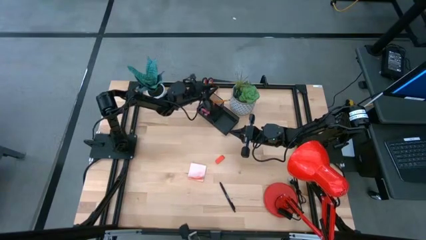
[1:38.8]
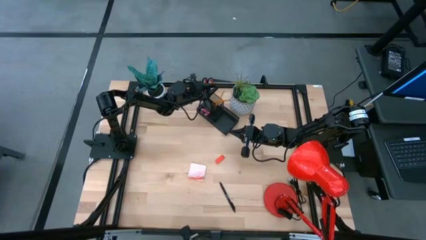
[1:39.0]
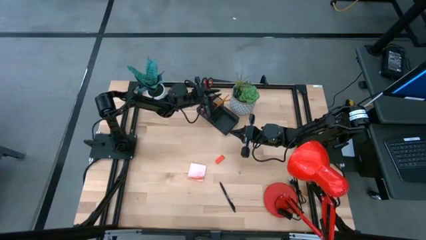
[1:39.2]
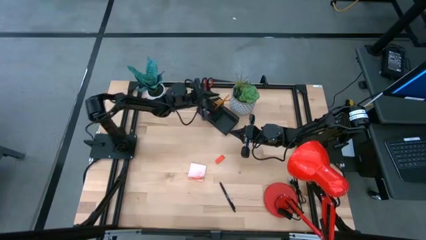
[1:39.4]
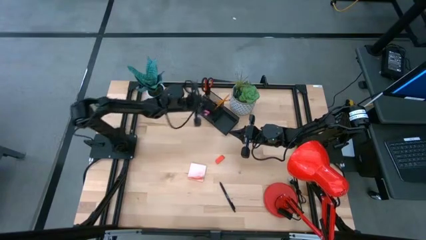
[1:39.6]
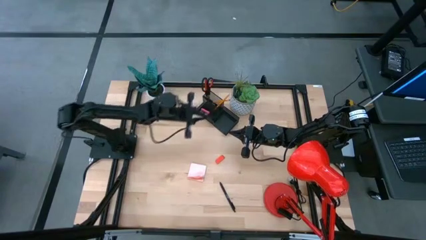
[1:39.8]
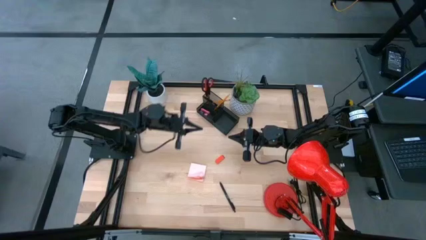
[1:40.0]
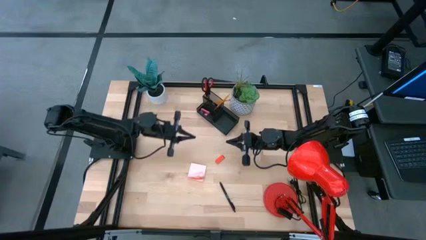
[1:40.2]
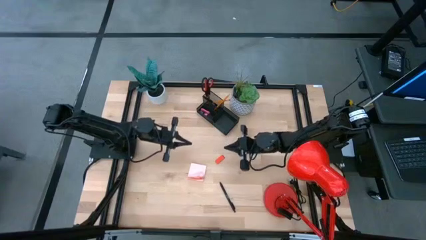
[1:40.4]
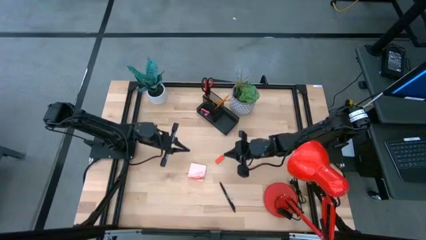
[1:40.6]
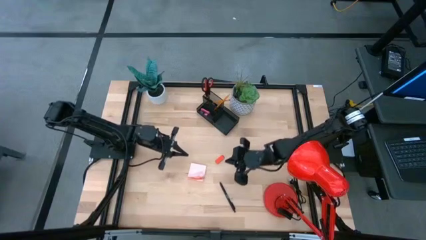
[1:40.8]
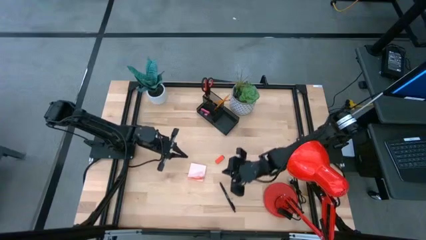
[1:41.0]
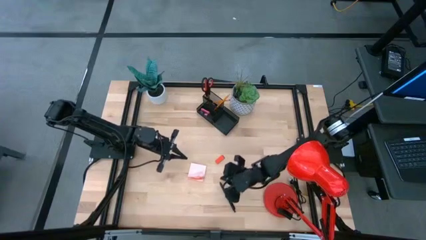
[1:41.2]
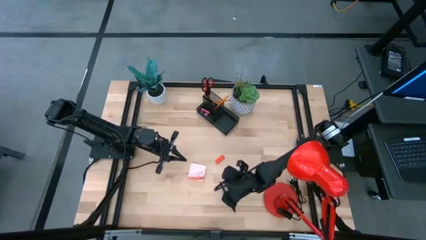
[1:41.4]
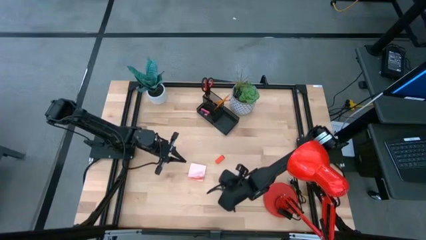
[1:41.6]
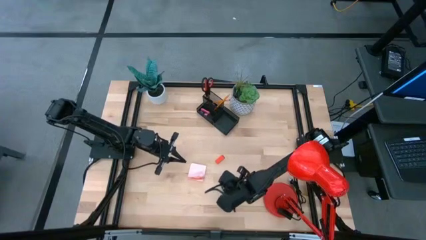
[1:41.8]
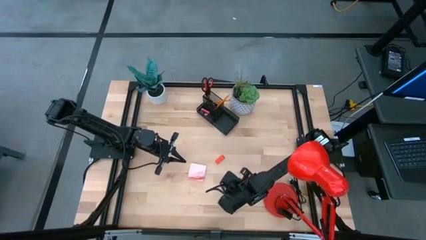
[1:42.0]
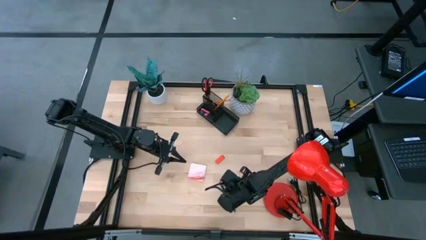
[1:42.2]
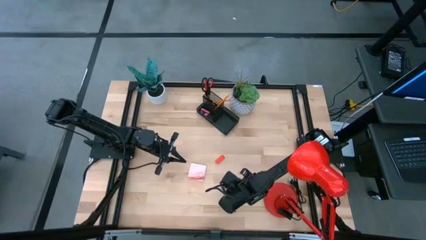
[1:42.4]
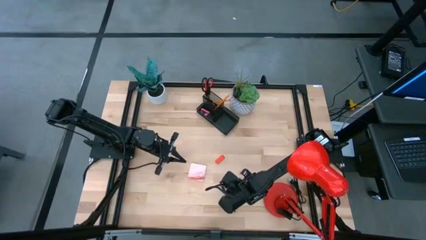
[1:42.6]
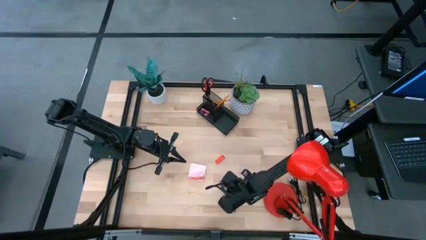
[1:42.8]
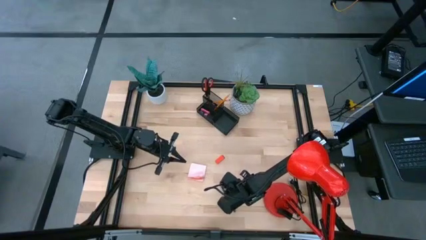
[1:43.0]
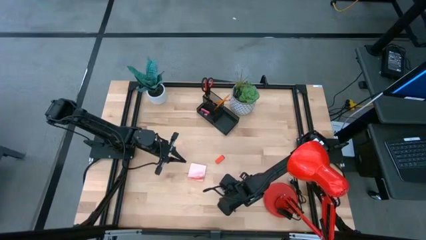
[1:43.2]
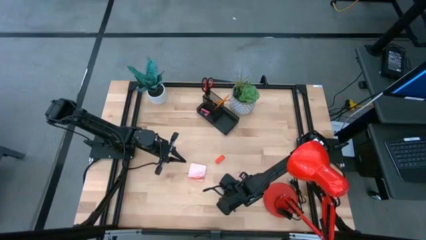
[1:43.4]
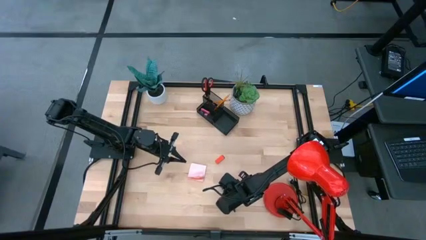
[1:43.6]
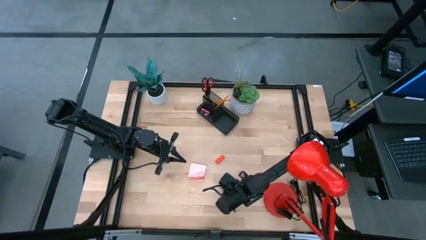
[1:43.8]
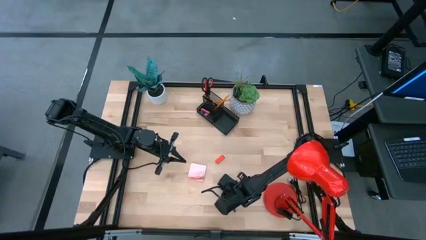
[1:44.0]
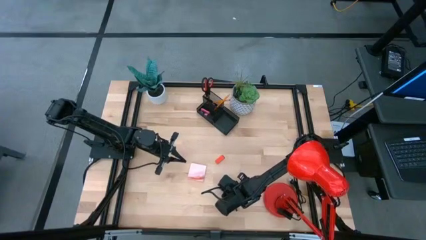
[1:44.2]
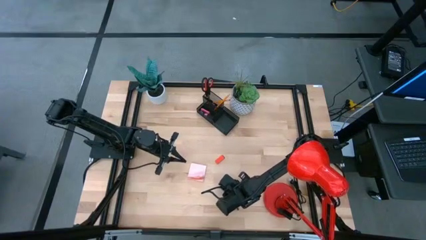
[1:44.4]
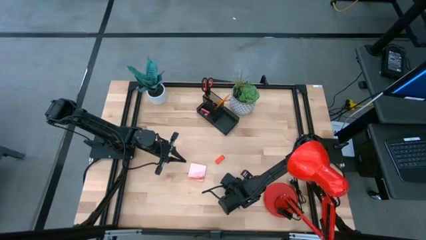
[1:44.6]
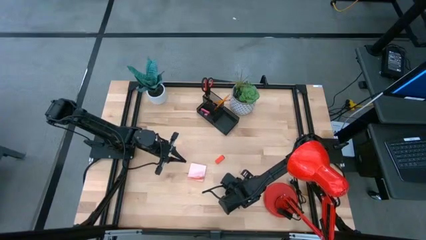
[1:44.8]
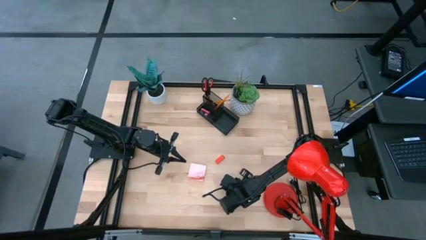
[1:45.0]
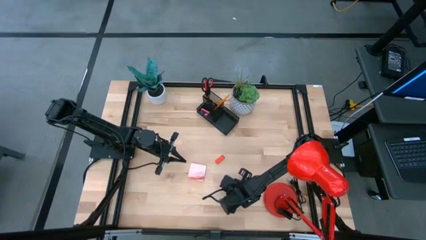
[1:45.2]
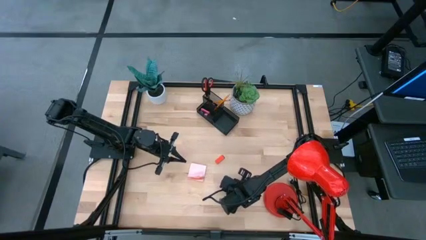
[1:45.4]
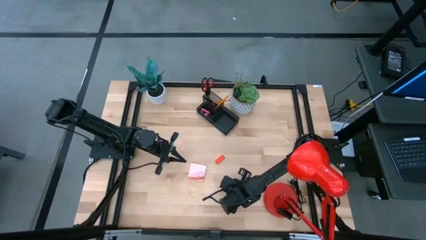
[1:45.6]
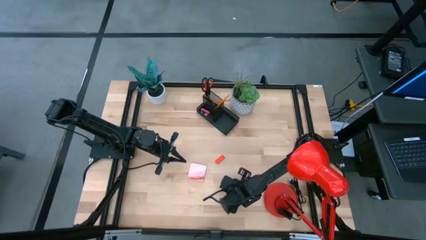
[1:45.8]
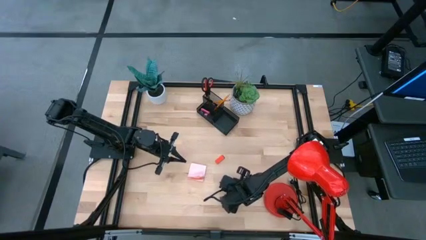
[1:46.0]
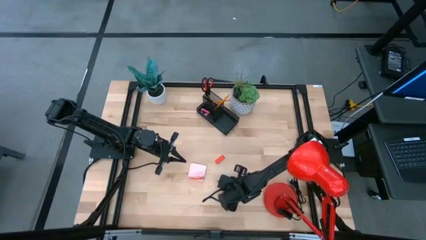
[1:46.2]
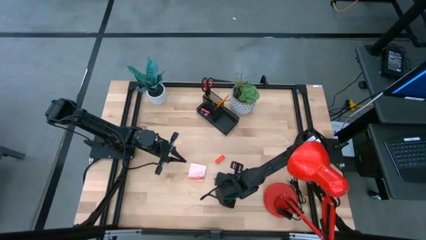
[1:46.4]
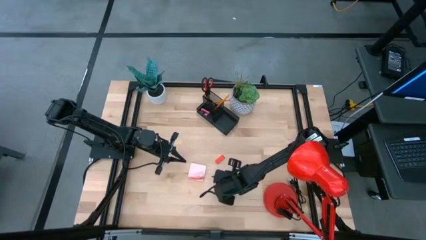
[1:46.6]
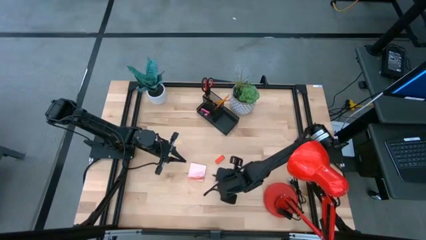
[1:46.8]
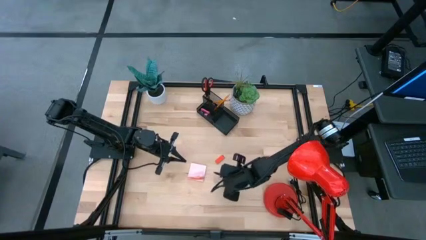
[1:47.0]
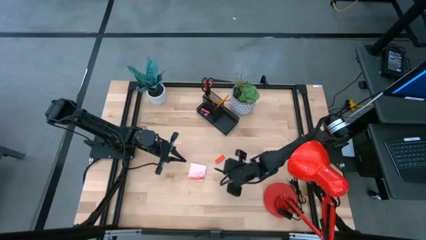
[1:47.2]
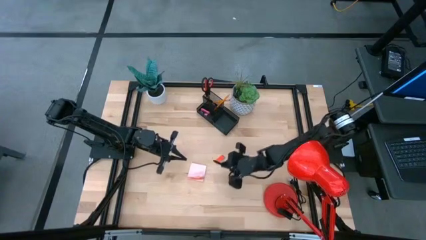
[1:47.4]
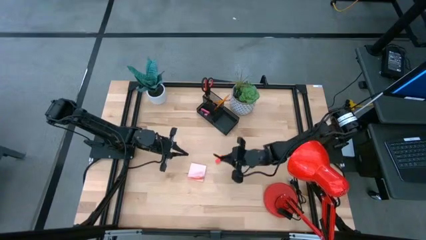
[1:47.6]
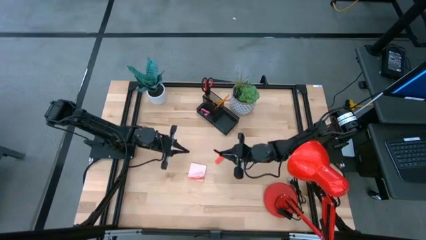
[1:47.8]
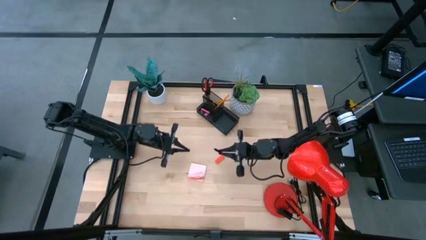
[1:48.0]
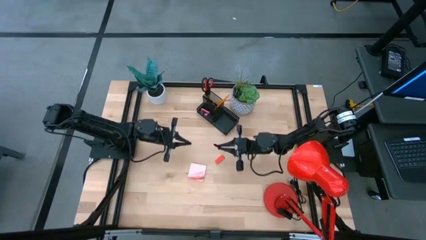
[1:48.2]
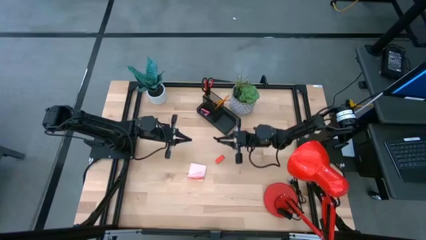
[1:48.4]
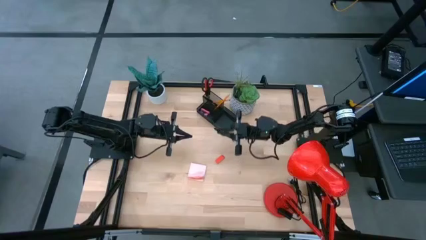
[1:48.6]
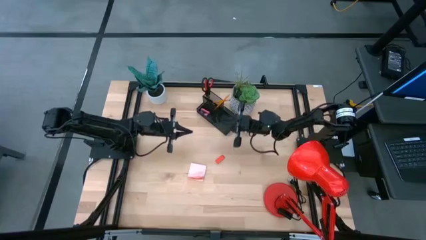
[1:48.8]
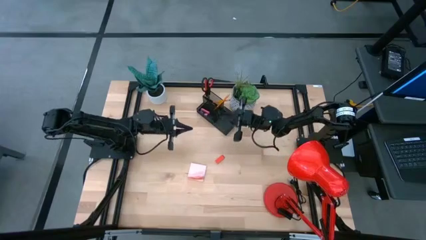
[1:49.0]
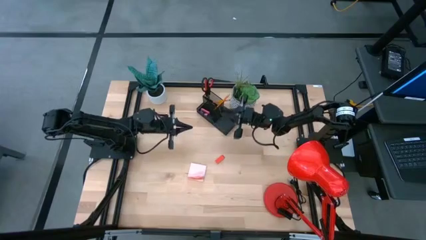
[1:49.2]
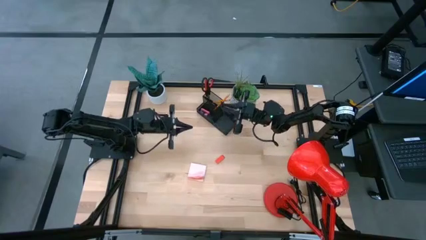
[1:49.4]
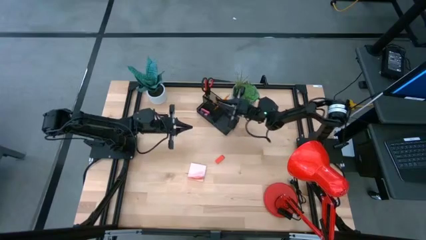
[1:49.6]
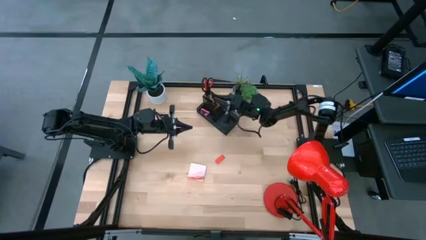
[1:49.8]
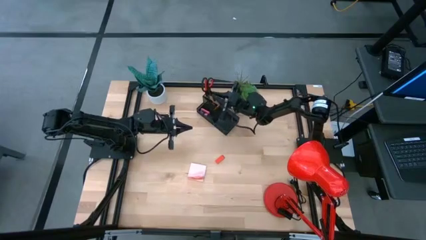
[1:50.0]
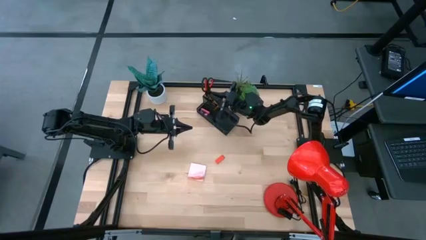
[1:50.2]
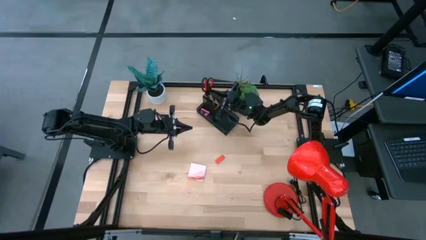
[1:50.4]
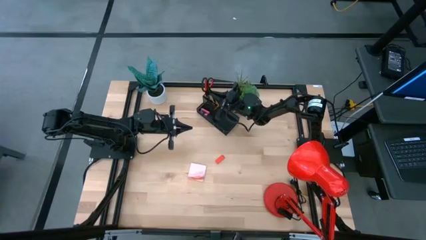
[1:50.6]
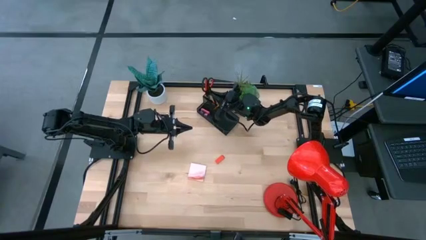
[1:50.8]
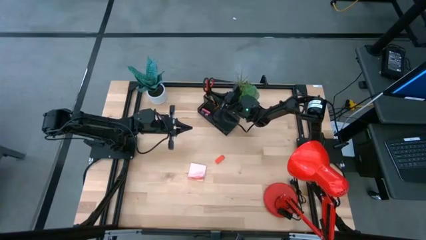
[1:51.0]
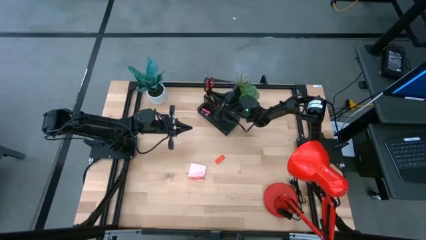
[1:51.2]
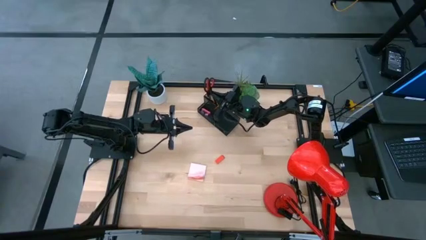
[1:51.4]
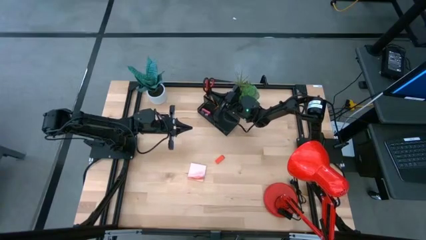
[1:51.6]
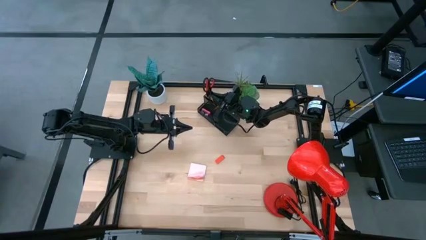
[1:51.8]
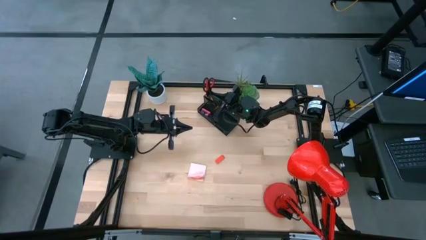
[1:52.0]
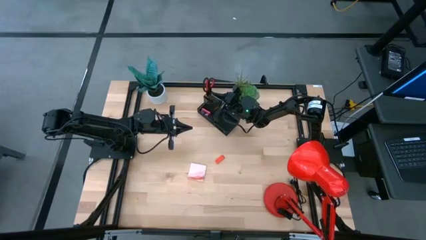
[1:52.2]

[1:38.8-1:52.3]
Task: Pick and place office supplies into organizer
Put the black pen into the black desk organizer
